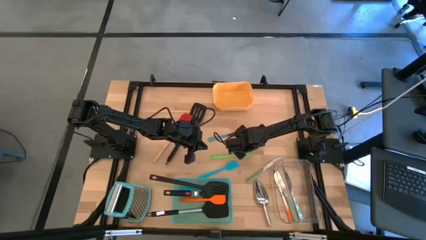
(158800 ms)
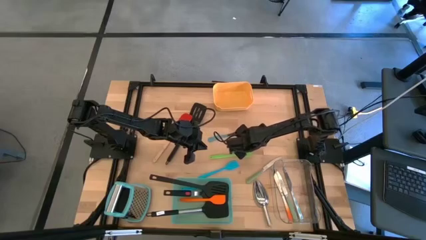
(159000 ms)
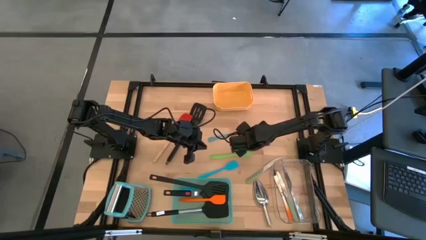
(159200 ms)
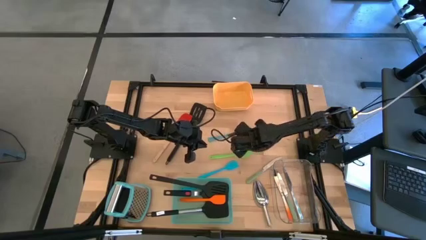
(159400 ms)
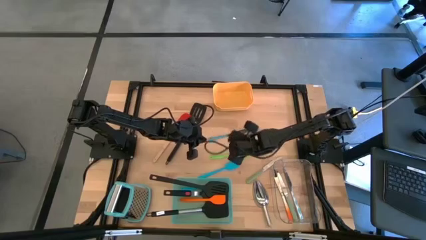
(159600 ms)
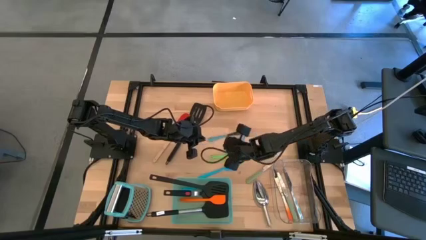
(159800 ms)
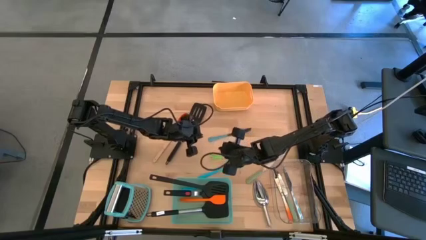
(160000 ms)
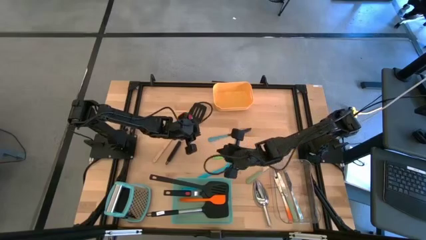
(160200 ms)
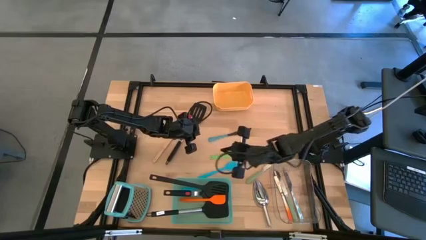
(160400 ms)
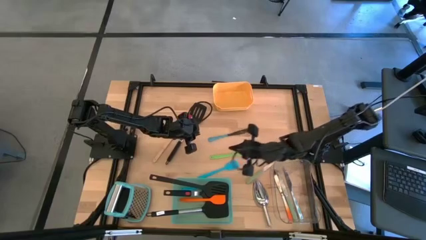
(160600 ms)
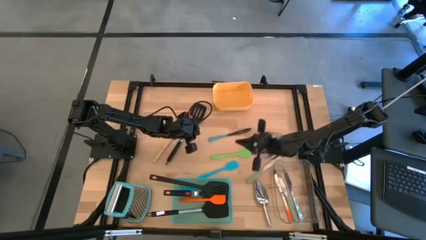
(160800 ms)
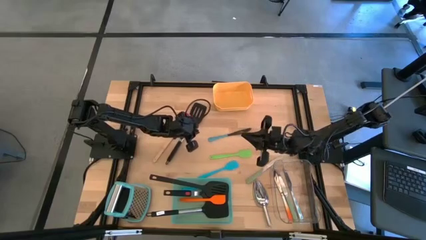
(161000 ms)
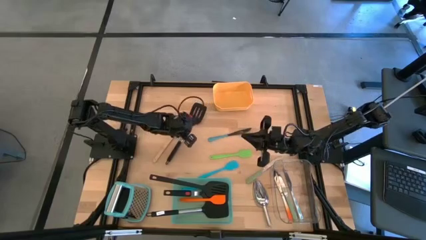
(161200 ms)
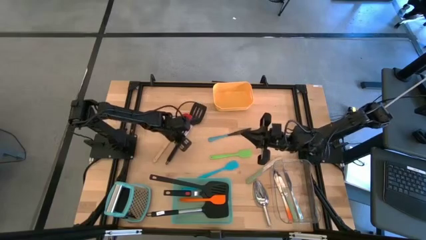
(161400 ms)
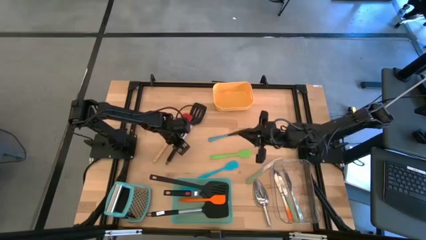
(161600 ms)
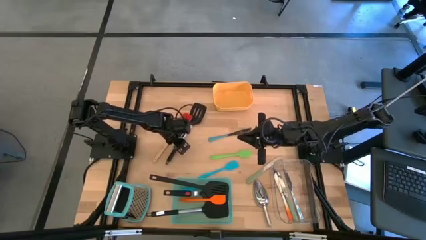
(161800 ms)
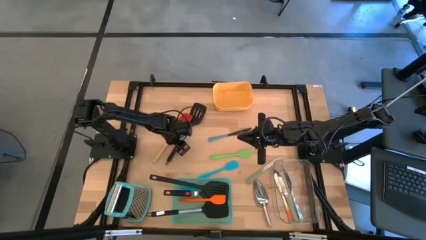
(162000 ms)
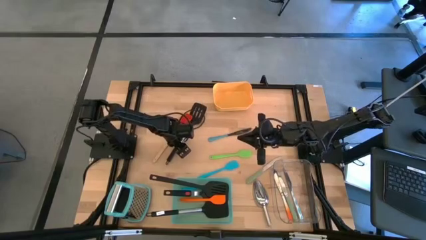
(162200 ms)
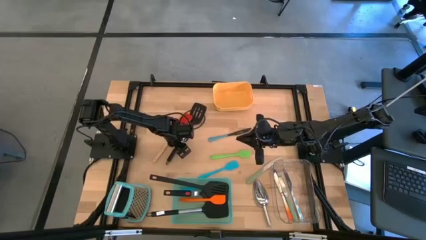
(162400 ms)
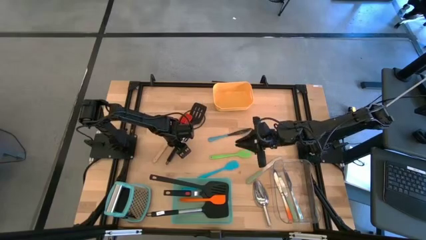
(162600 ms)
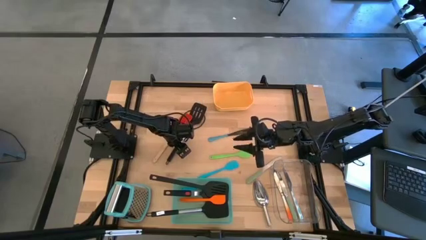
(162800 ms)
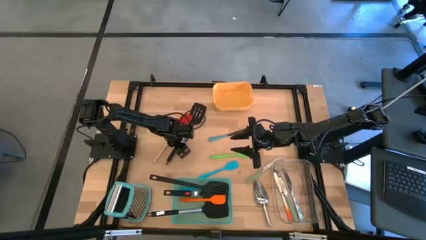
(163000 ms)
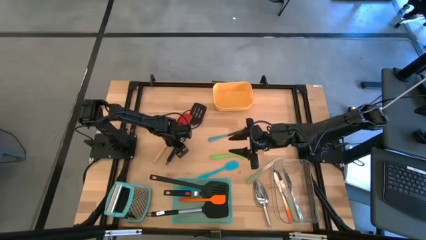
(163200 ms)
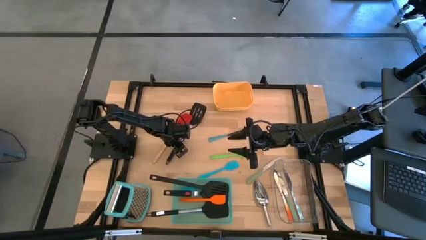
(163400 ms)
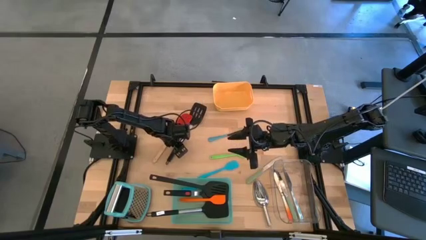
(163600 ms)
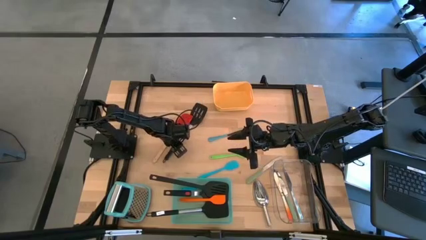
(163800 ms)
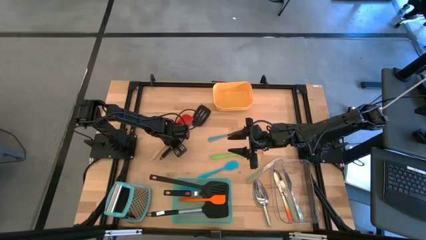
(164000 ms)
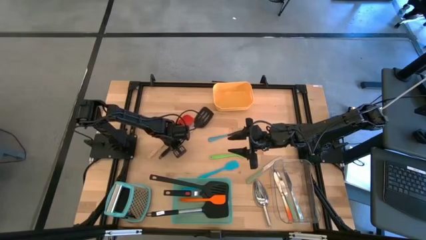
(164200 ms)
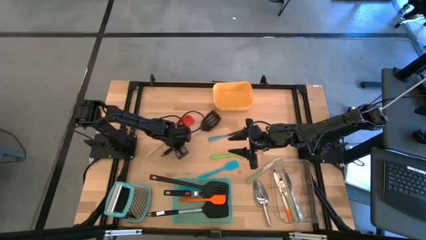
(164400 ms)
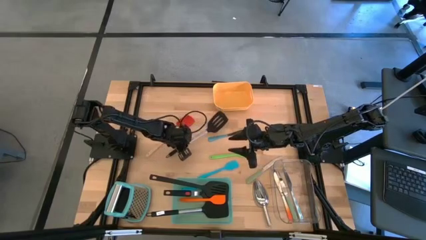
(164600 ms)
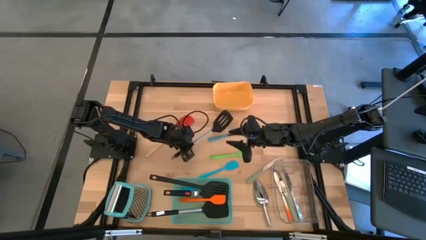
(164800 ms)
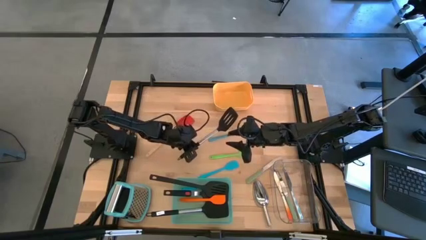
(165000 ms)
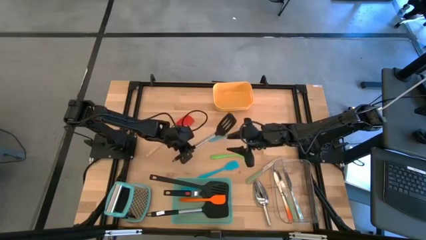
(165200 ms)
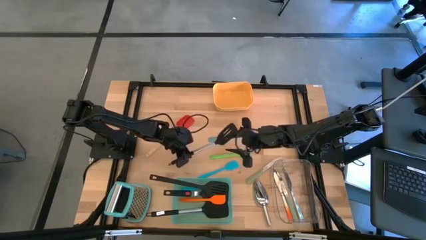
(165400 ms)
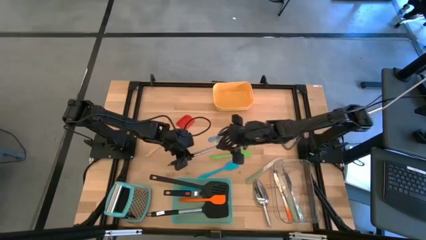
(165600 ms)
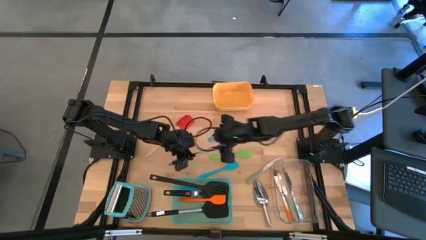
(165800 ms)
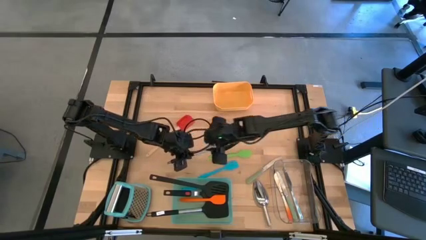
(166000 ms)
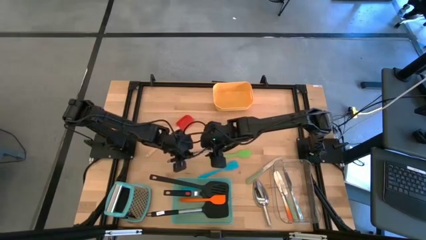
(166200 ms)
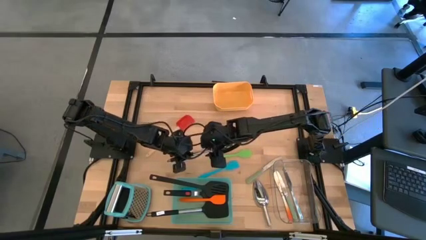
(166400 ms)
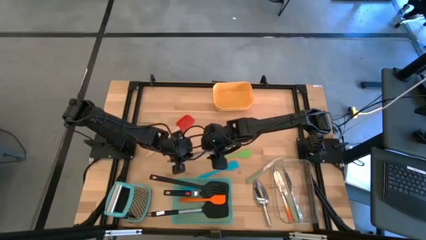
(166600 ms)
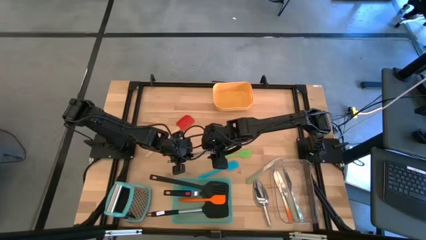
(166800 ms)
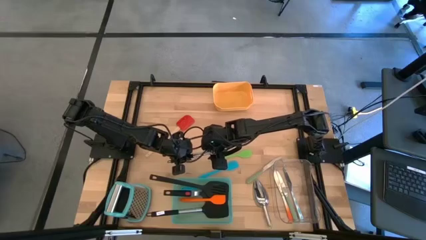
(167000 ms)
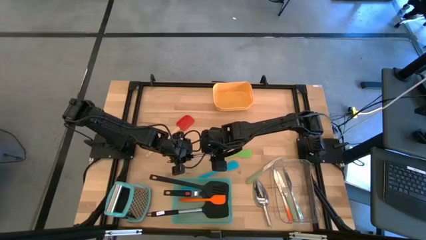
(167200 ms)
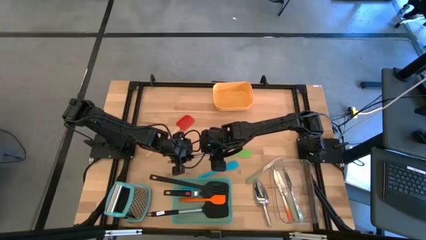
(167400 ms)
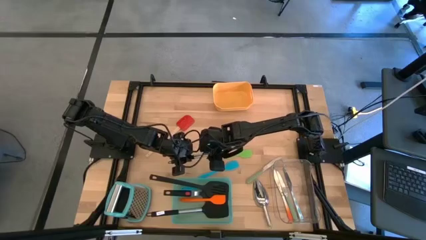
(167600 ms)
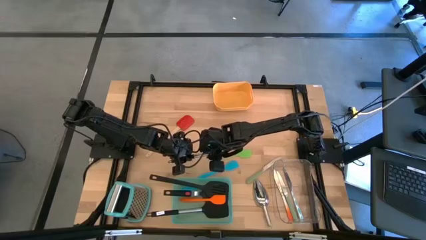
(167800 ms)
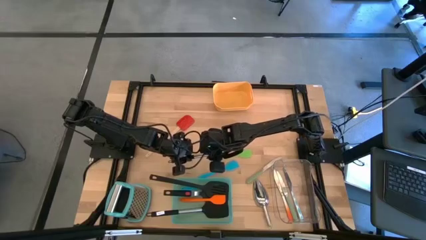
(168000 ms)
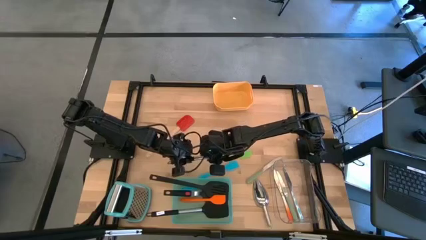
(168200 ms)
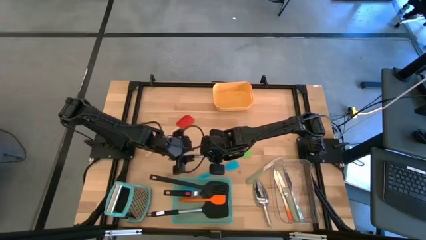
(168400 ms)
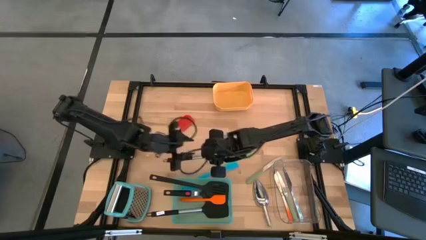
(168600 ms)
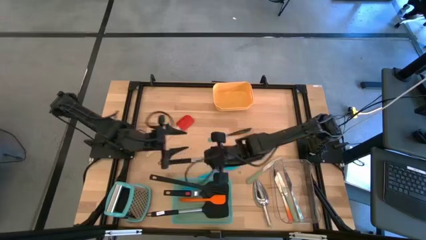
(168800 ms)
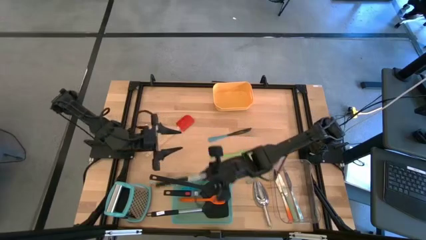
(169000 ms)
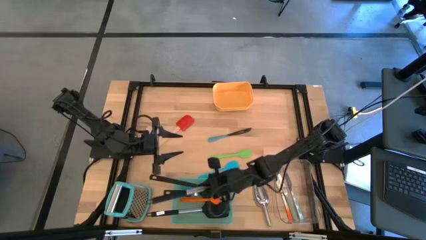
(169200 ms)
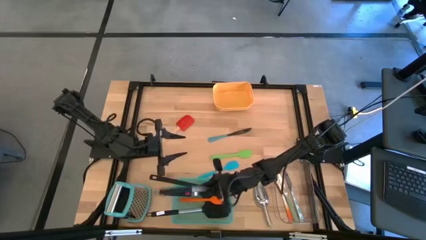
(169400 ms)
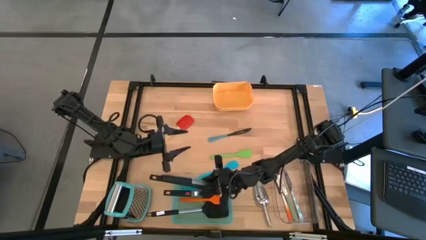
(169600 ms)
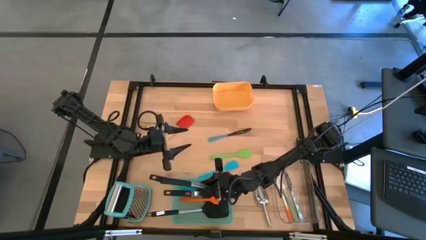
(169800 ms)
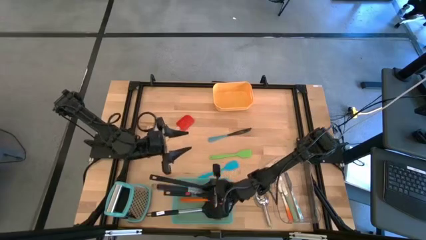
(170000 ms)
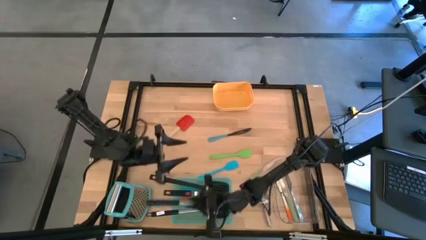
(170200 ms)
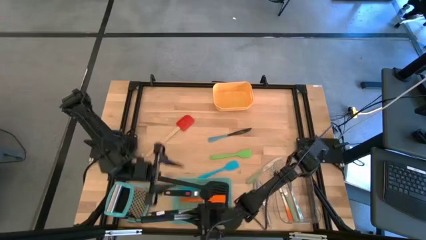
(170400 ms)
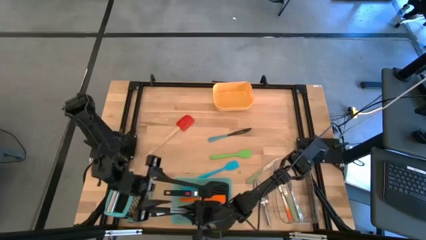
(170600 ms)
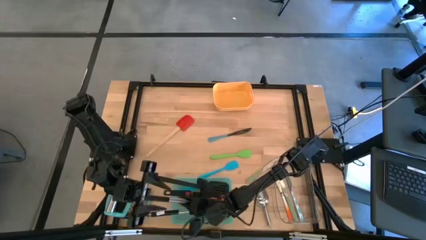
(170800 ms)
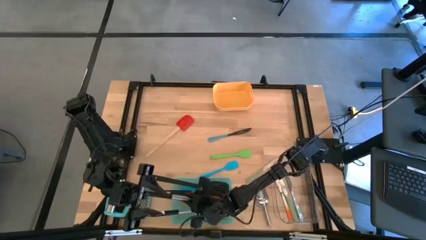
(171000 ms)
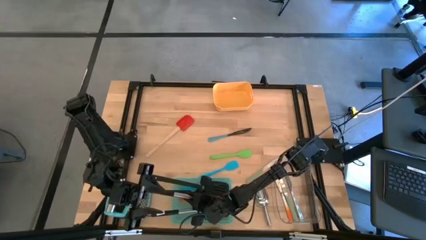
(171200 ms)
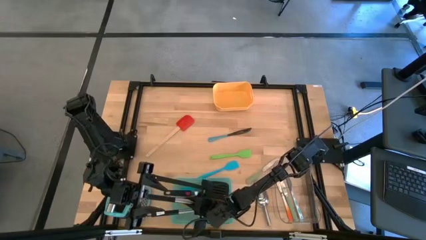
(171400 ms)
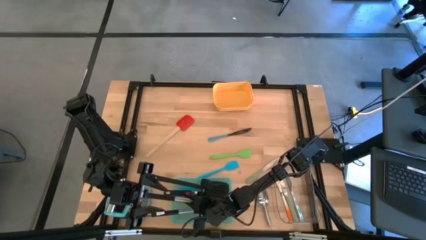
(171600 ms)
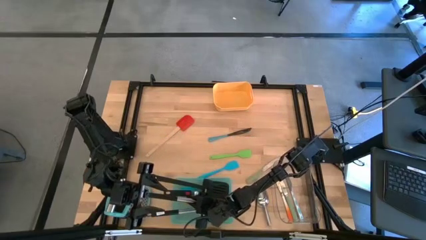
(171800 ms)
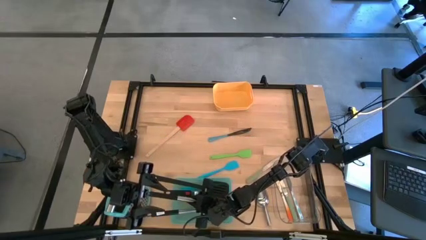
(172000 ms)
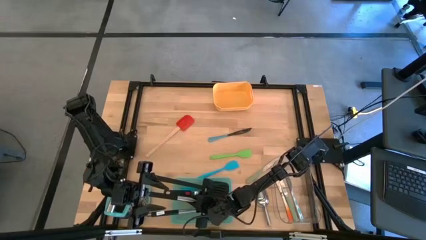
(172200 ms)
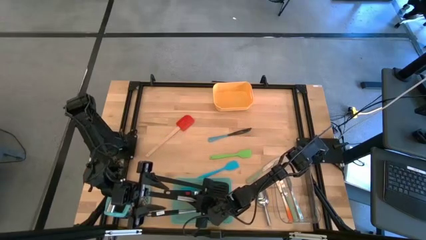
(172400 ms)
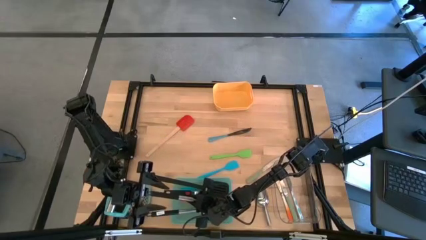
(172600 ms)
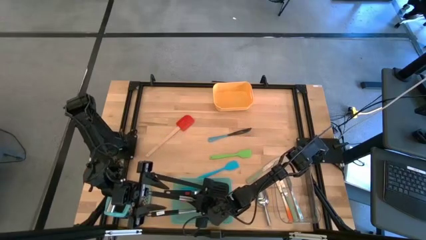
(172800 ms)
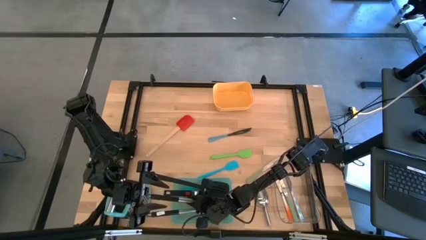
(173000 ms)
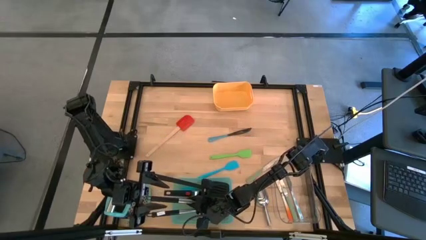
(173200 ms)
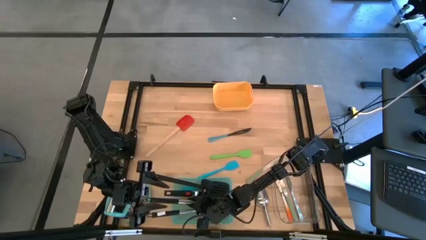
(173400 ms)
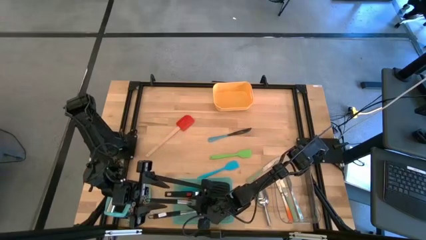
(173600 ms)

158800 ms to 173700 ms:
Task: Pick & Place Kitchen Items
Put the black spatula into the blue bin
